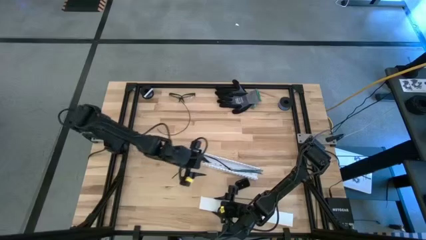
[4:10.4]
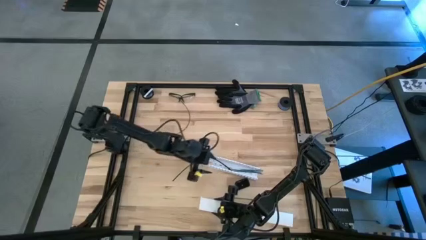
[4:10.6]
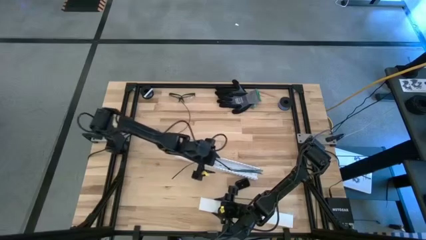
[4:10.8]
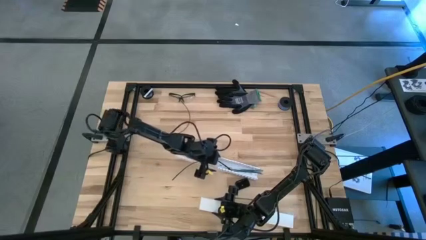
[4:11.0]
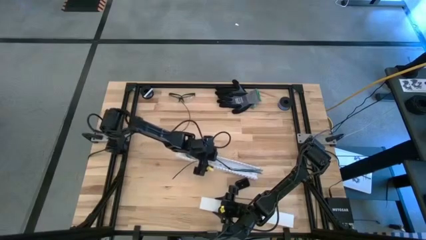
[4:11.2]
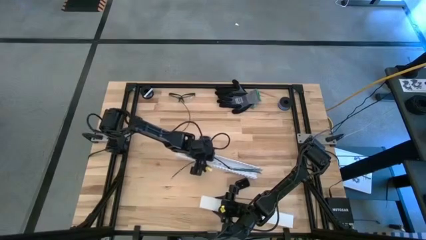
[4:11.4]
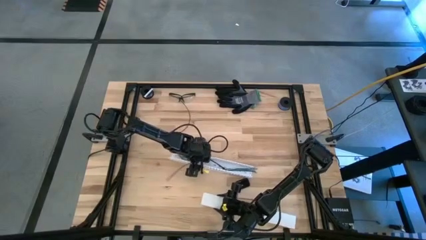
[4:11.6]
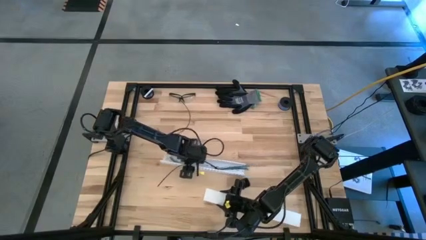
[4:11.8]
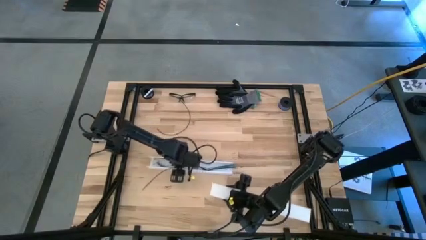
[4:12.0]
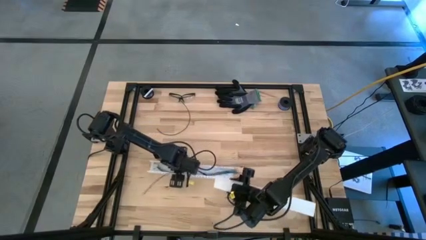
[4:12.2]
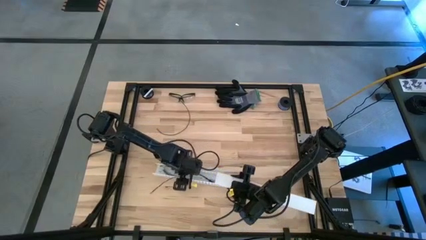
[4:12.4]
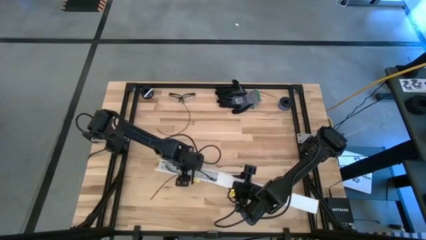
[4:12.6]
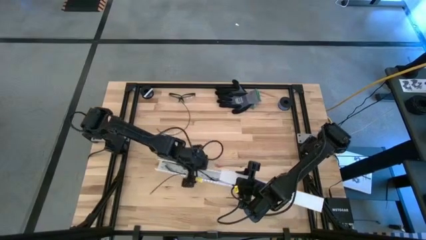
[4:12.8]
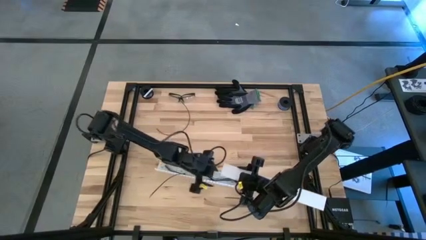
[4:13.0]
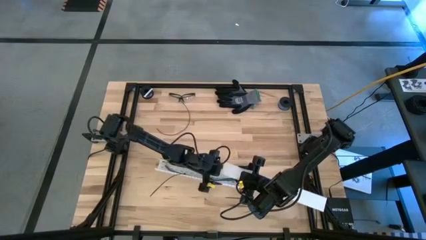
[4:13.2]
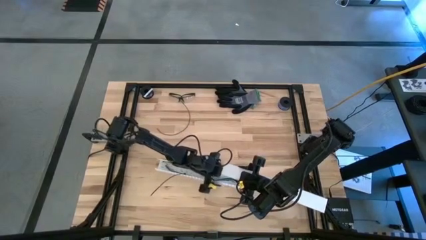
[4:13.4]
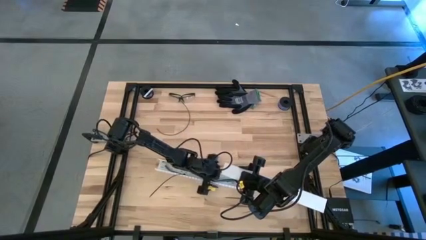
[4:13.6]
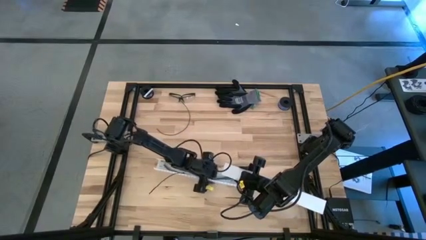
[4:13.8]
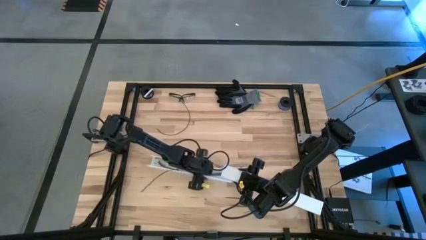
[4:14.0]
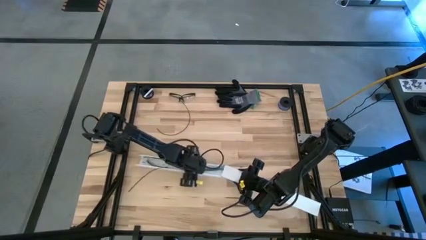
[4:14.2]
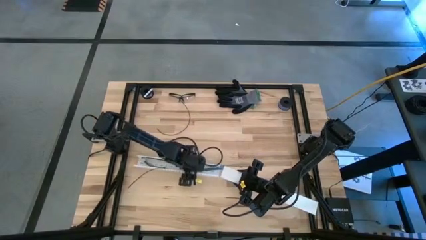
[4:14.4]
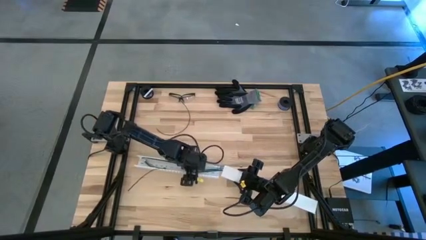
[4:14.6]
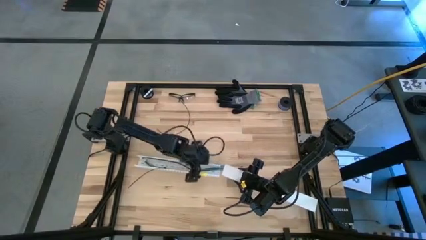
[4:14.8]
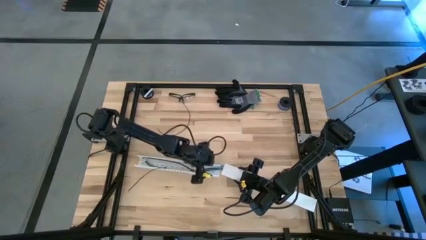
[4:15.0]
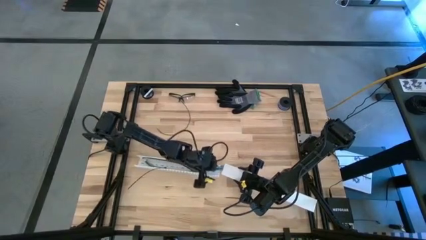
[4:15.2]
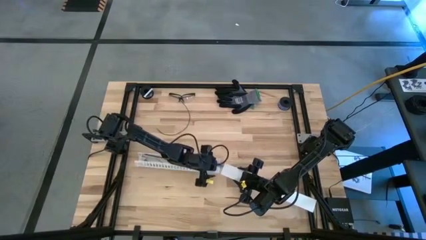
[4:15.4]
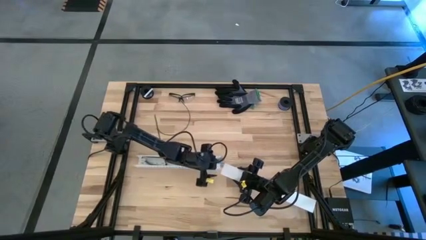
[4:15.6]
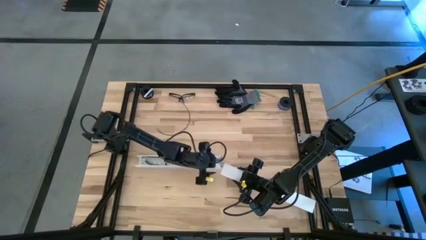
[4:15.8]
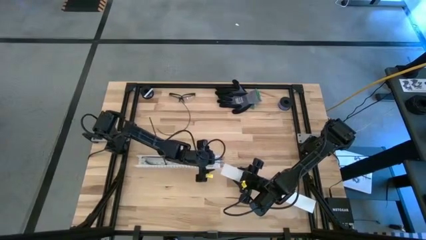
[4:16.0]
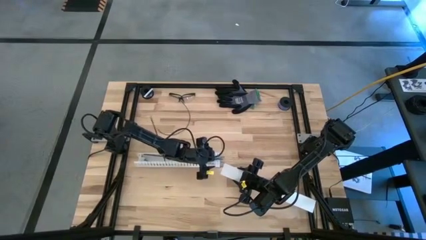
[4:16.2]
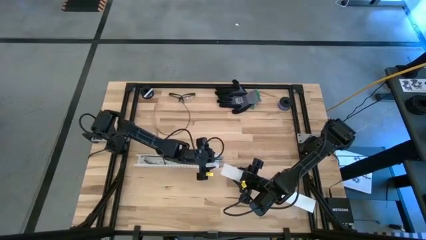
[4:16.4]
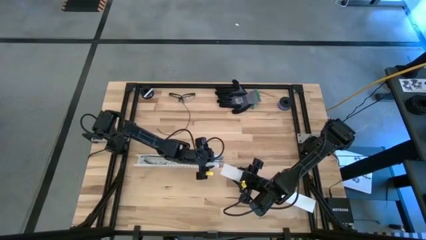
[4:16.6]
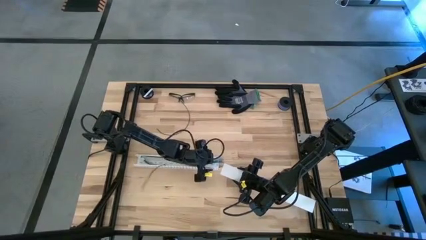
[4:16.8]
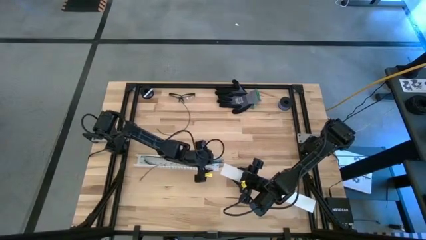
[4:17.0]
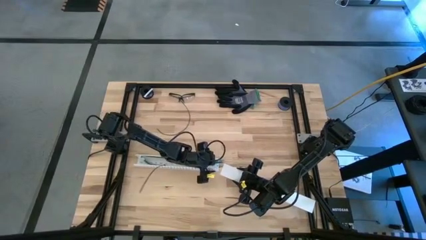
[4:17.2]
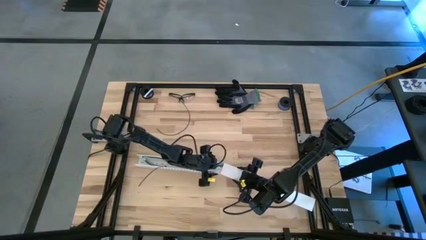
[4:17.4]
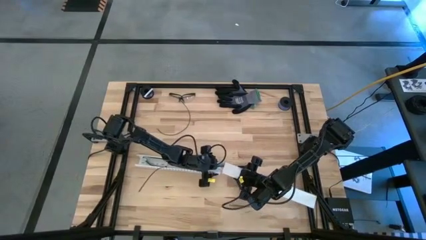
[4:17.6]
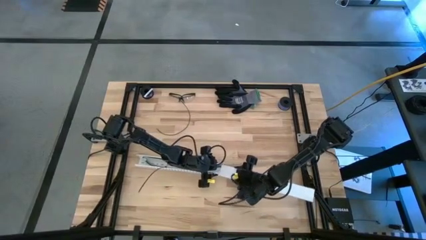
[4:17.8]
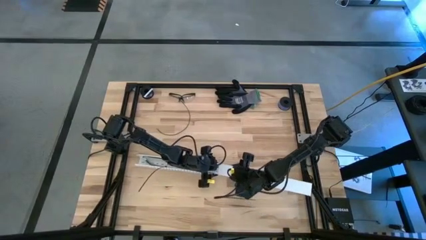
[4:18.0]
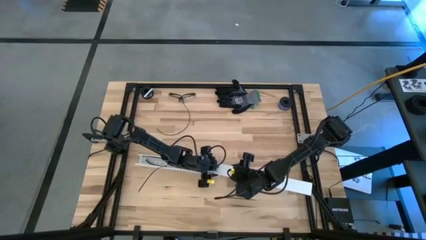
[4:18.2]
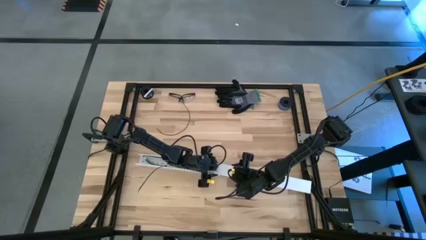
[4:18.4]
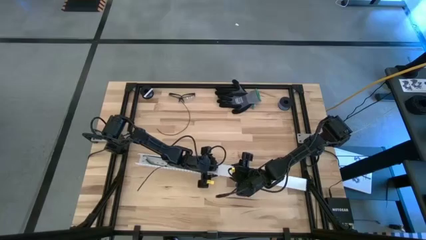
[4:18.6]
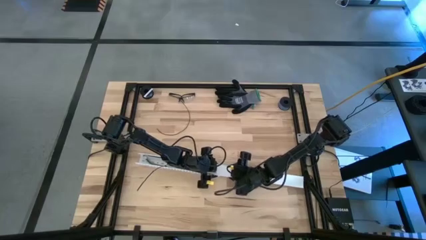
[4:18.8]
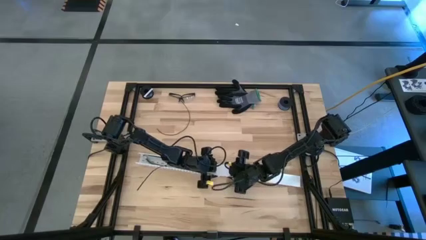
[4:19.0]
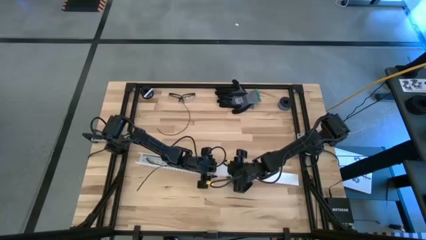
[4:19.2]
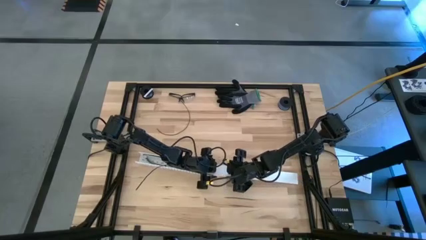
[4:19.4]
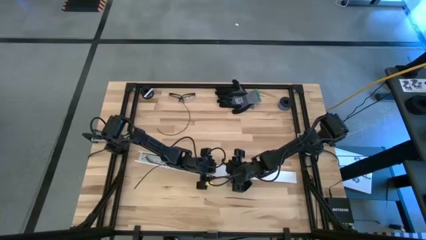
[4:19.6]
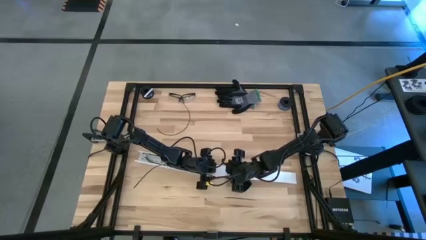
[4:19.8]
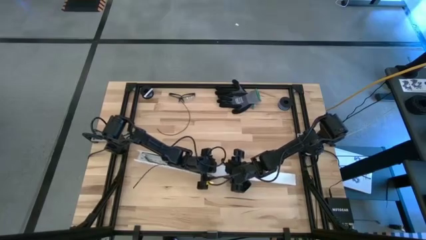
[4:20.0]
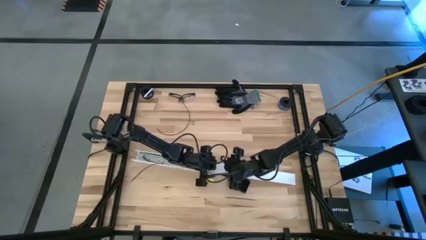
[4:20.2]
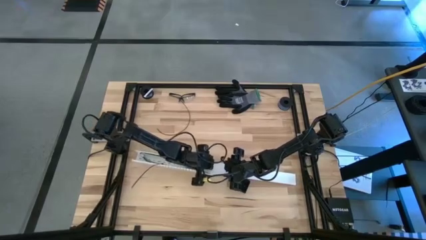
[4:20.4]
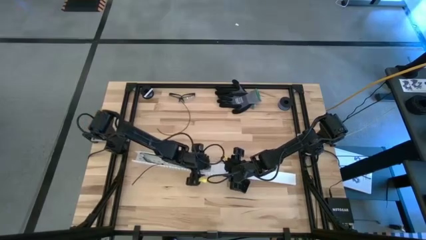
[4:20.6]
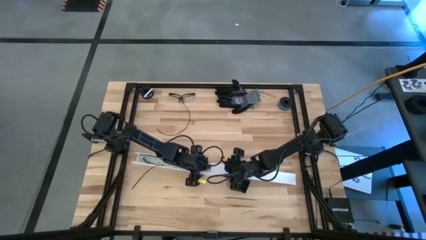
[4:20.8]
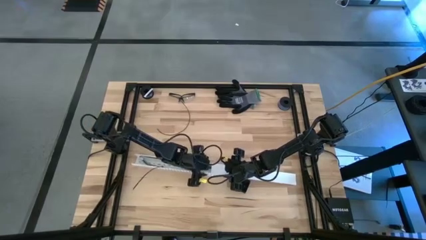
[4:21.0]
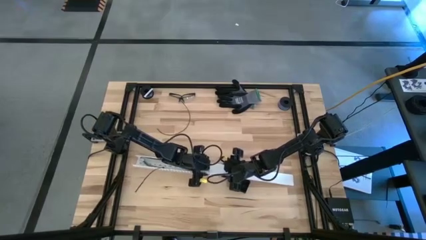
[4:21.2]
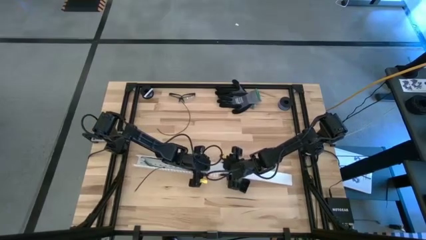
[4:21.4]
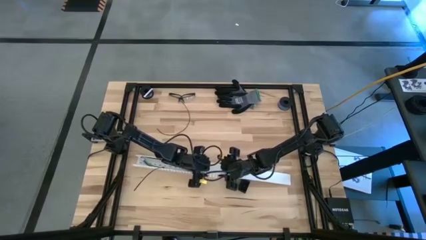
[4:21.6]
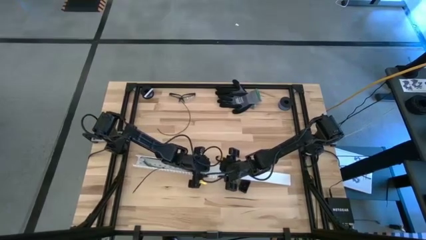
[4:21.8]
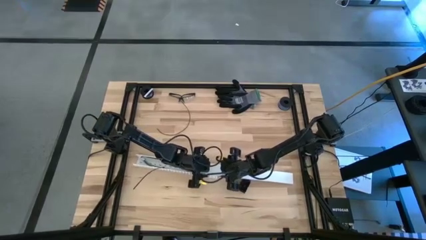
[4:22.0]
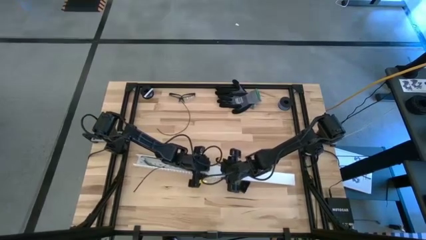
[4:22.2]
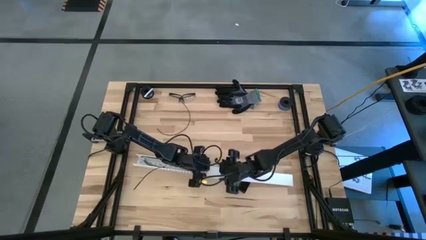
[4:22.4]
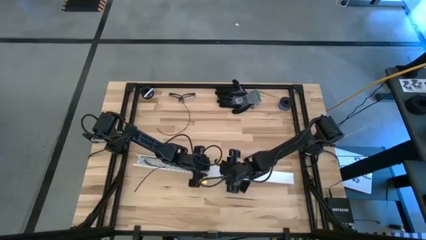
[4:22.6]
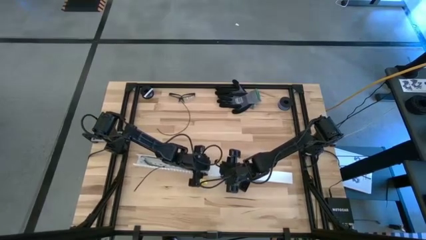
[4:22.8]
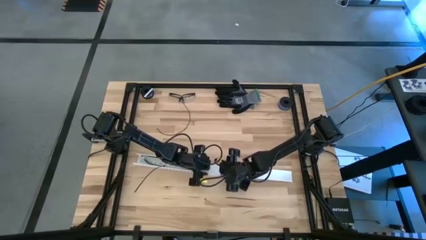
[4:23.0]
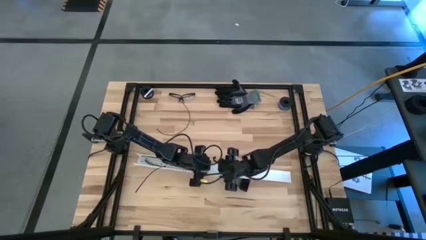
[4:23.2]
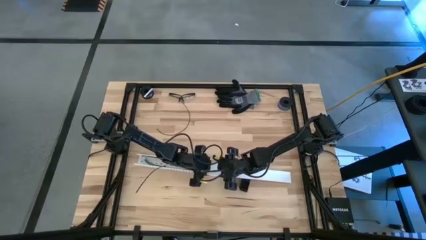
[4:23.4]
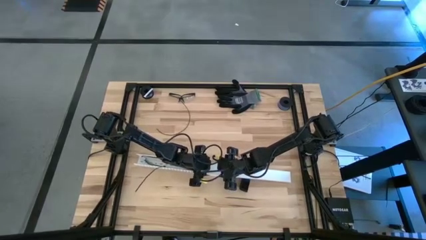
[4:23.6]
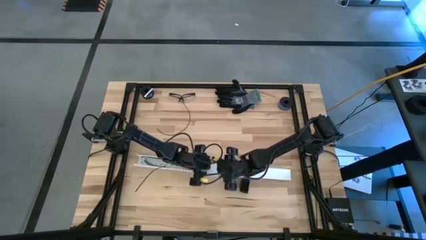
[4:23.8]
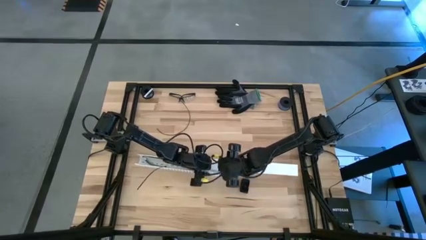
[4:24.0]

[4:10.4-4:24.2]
Task: Ziptie cables
Close the white cable duct lid

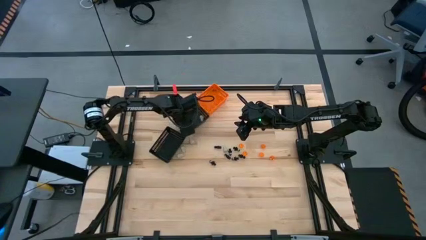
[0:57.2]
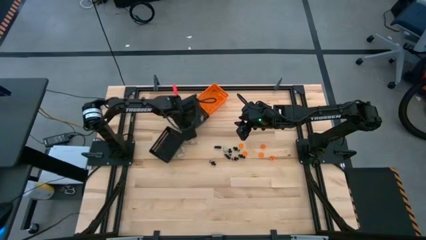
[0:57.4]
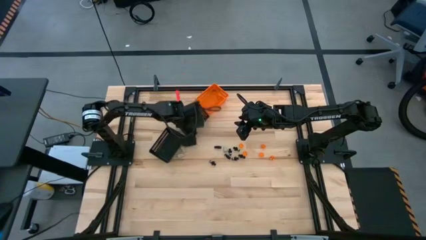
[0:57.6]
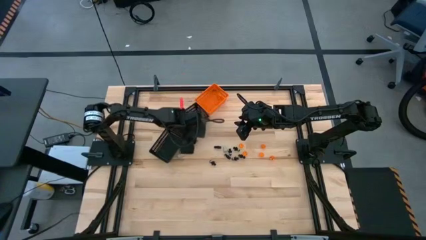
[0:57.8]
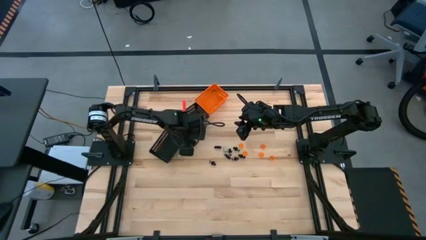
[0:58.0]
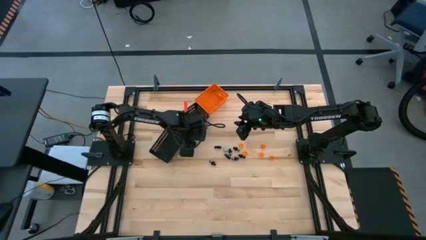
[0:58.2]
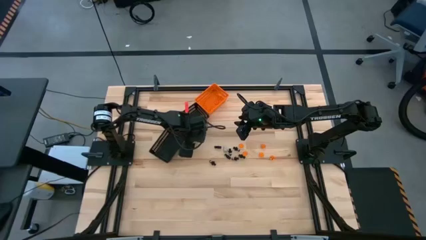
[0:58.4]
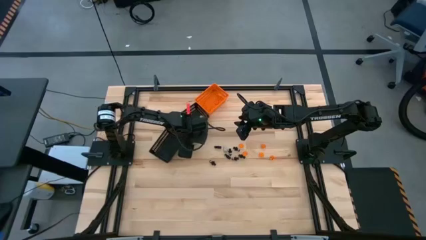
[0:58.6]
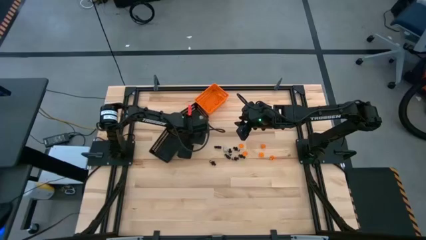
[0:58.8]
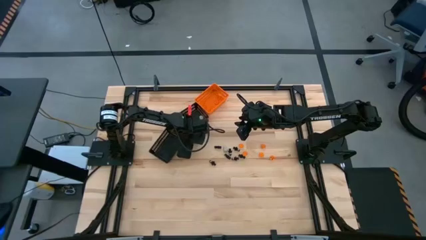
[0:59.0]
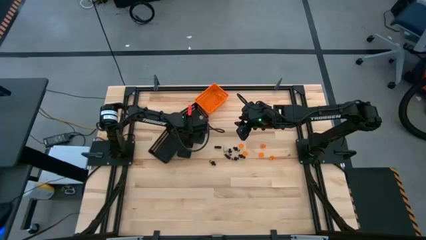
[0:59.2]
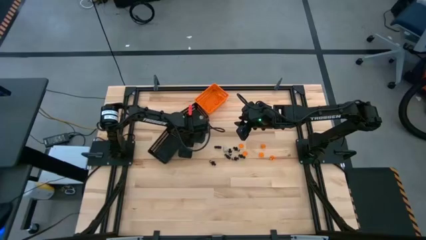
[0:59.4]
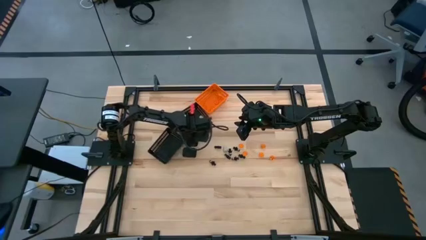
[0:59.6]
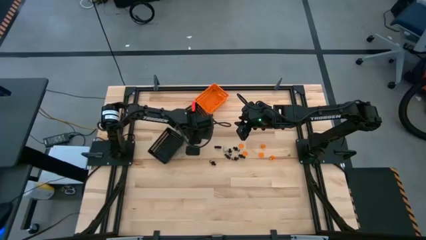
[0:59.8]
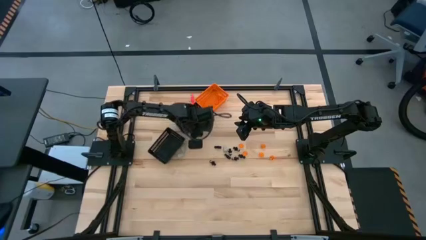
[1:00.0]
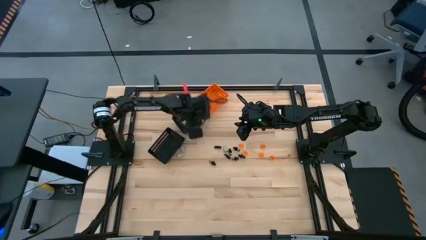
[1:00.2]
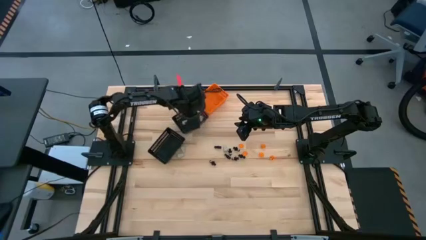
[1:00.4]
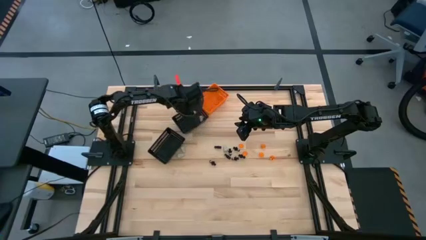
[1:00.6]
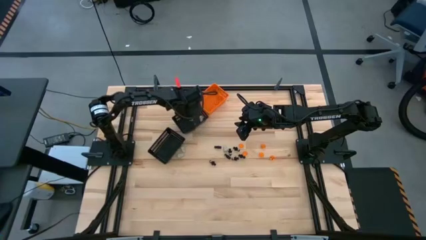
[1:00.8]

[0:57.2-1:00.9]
Task: Sort Halloween decoration
Put the white skull toy into the top black bin
